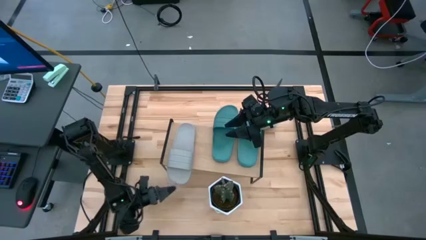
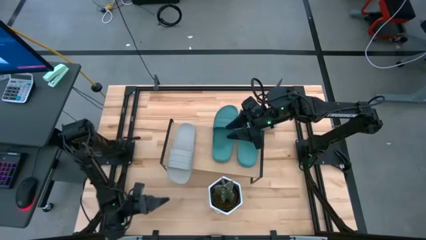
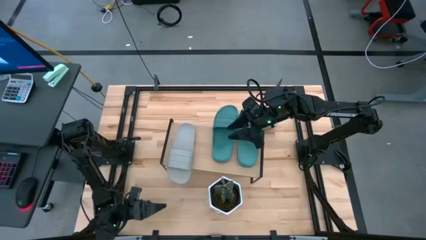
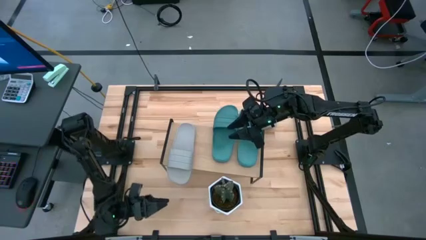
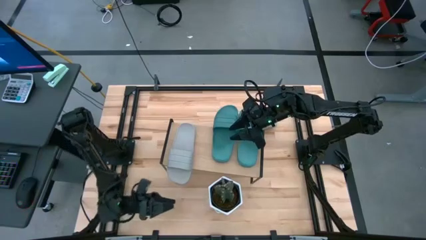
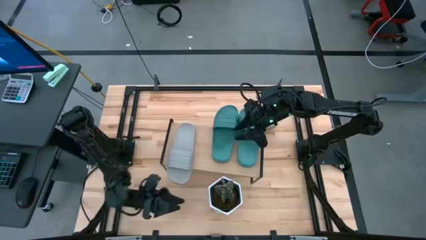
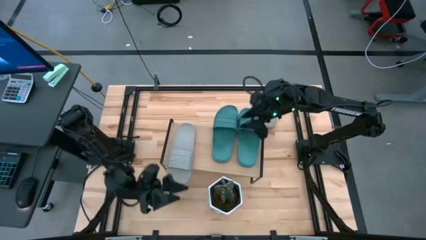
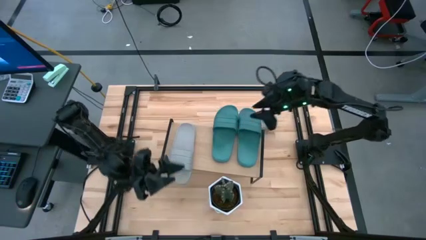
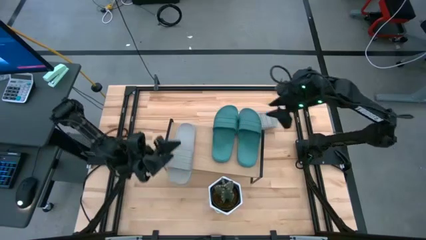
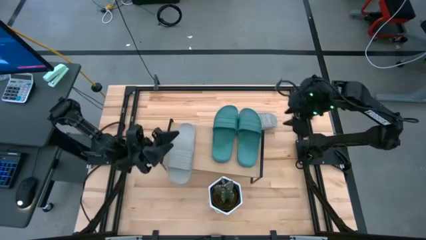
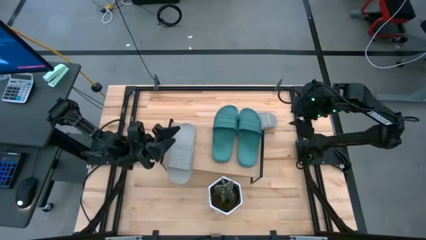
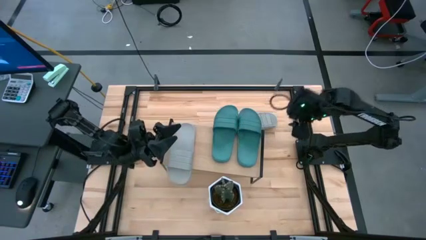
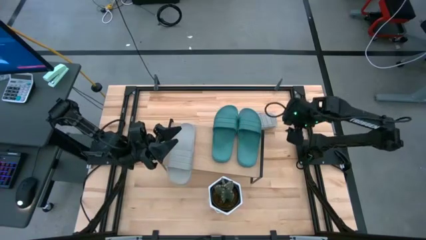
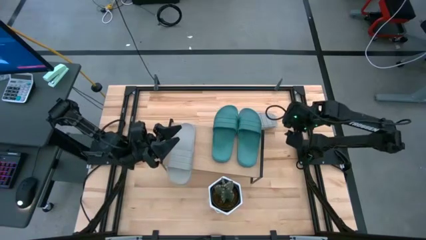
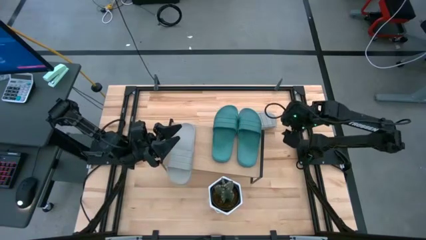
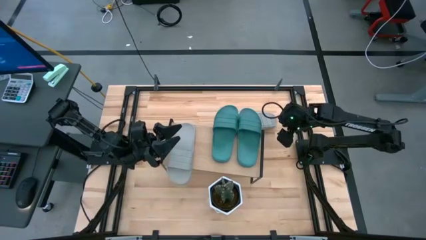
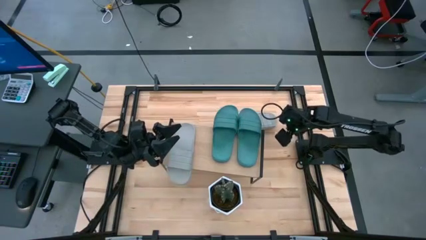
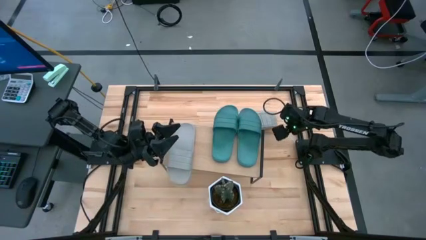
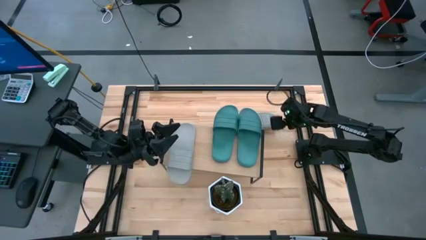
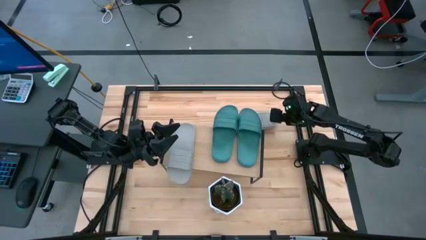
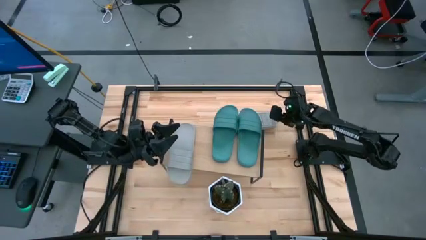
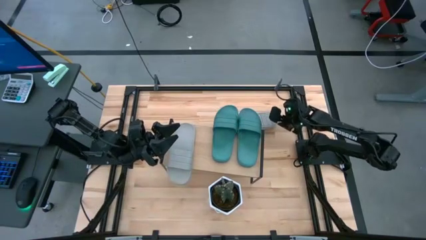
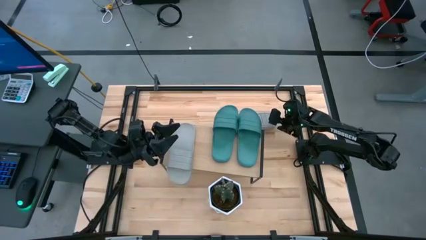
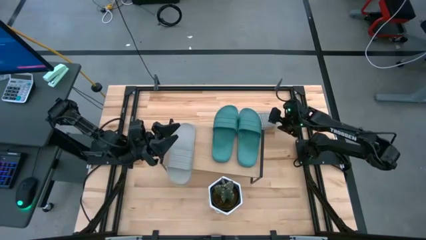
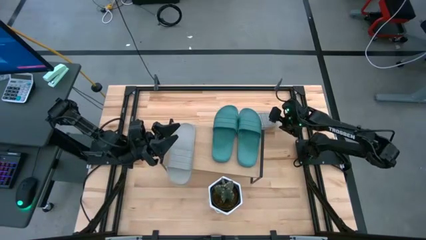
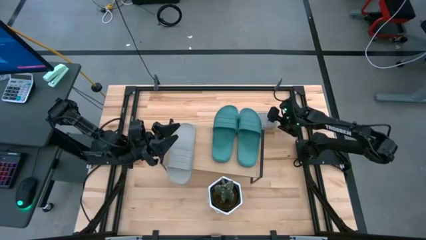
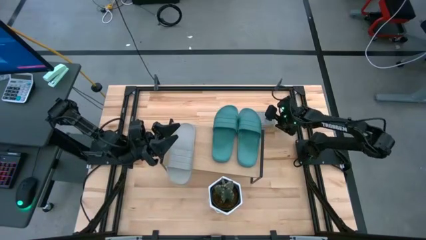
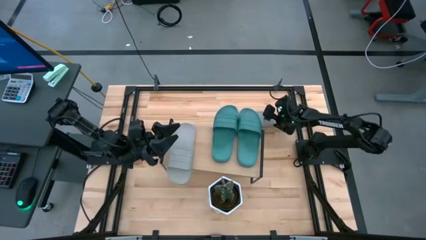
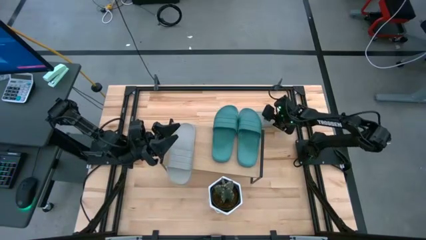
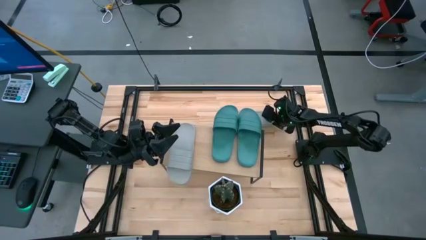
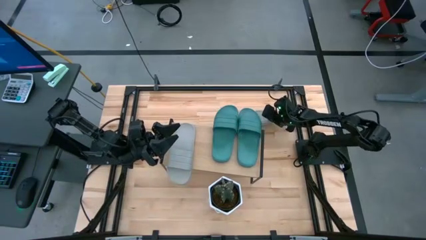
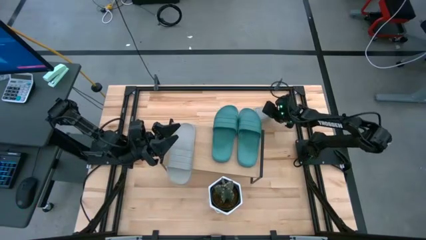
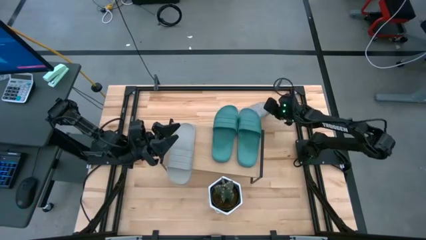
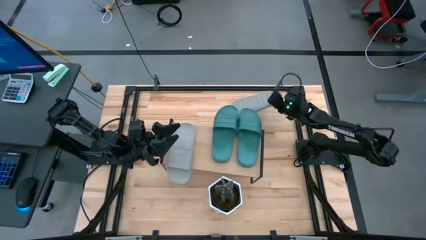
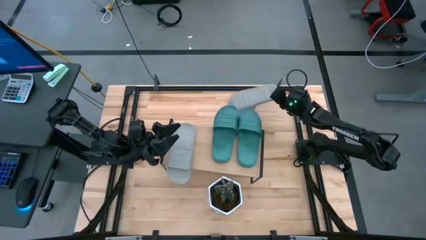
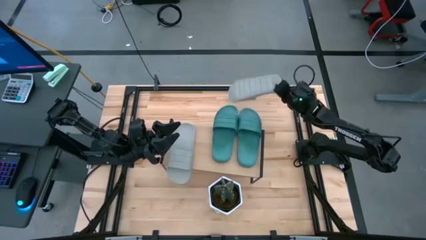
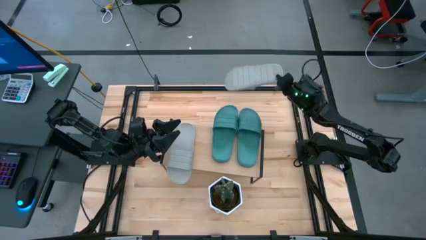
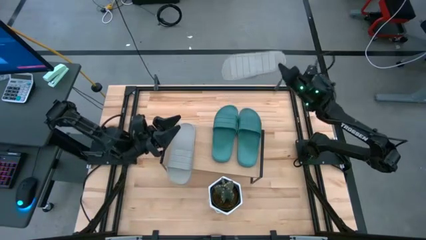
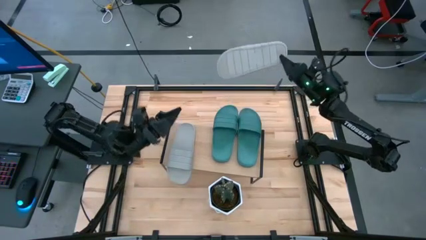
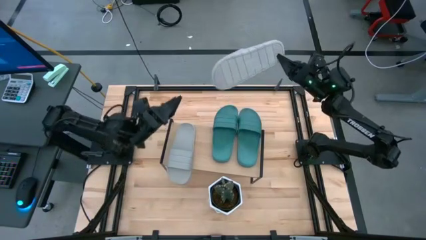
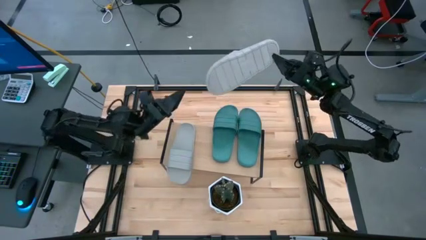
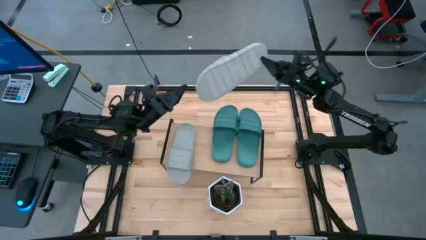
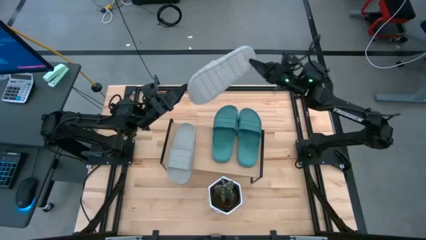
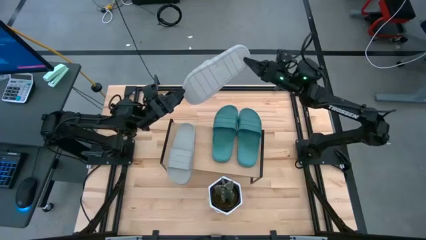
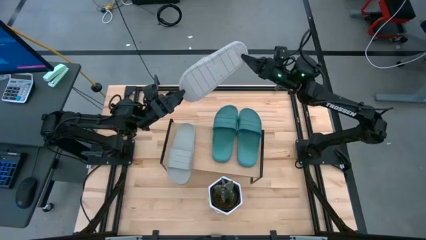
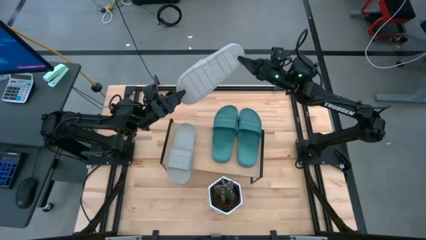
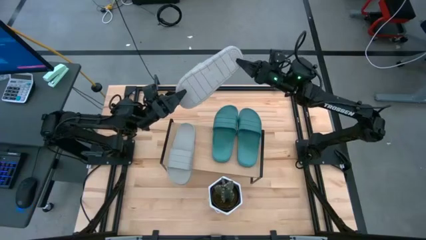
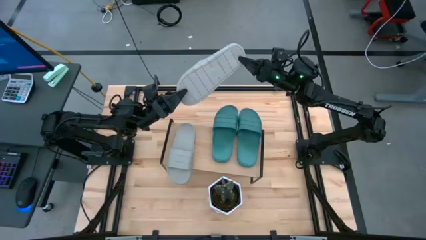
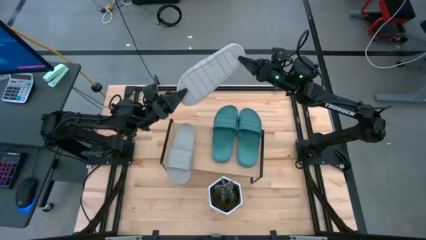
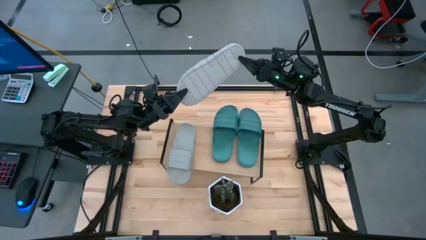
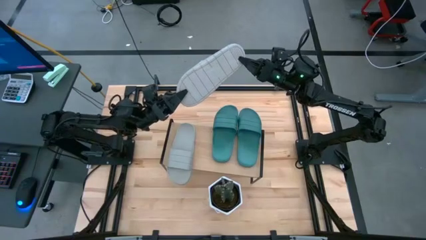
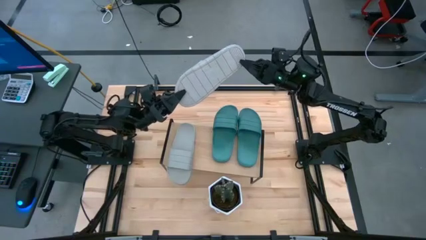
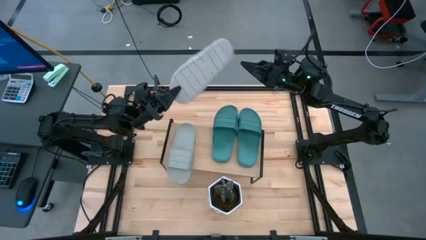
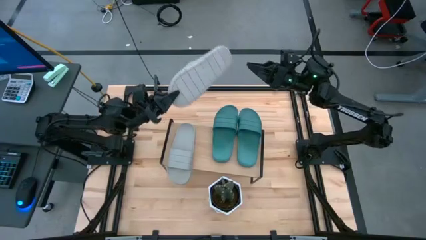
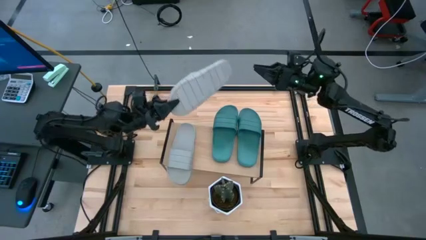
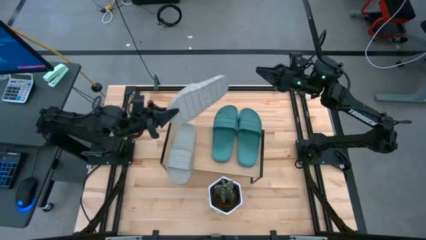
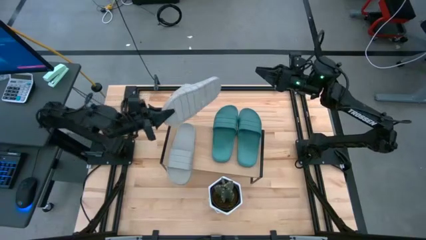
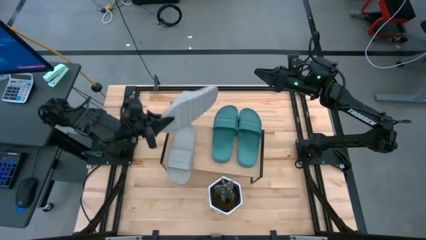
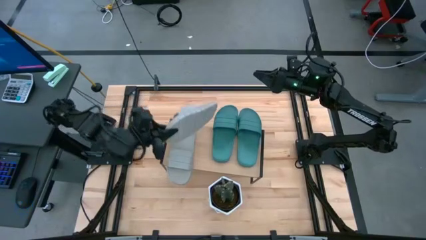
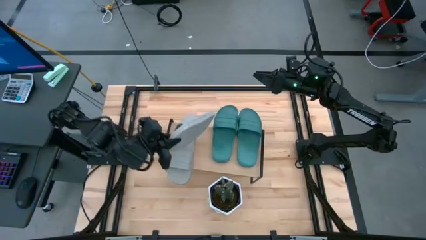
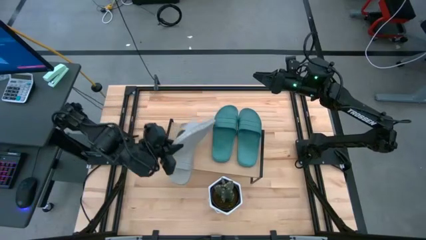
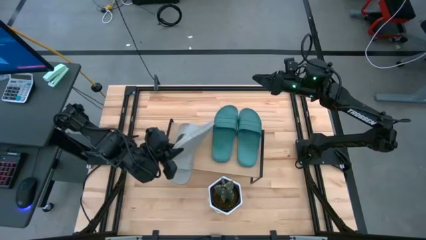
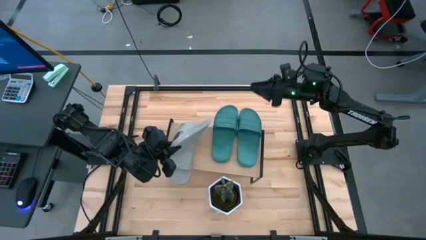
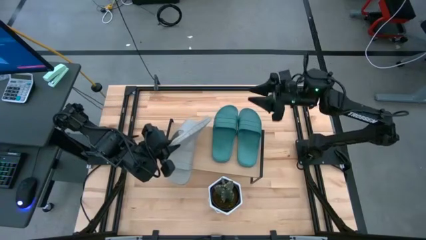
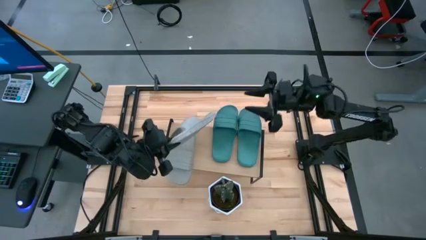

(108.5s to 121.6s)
Task: Pick and place slides into the shelf
Put the gray slide on the shelf

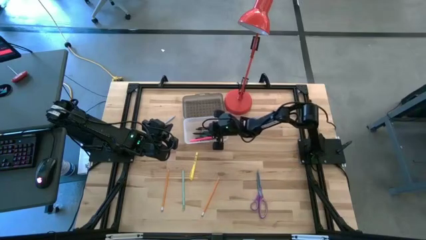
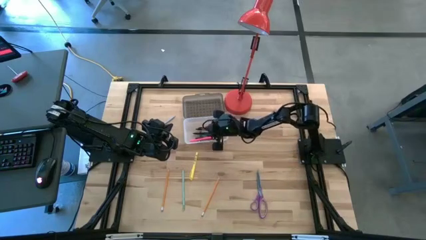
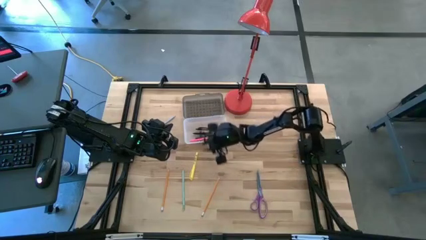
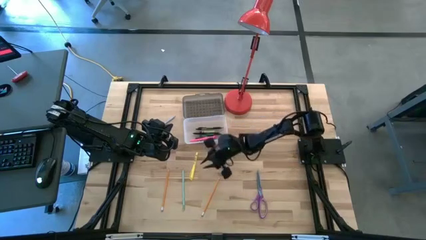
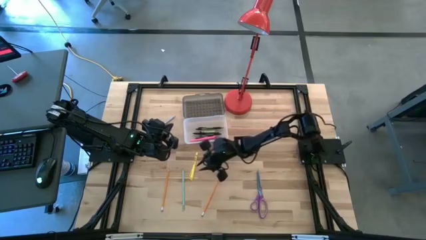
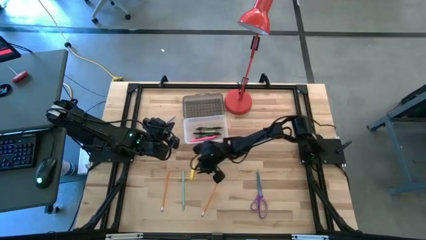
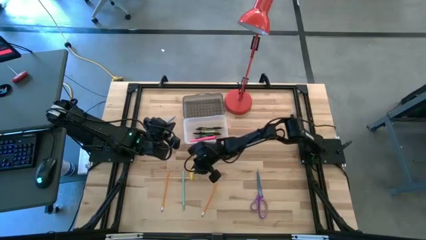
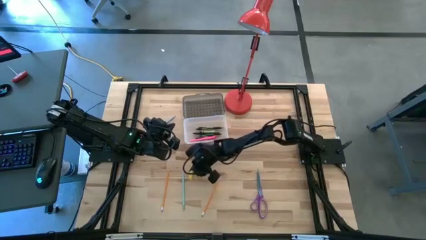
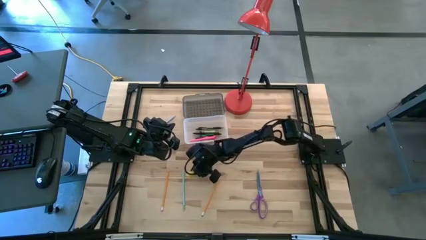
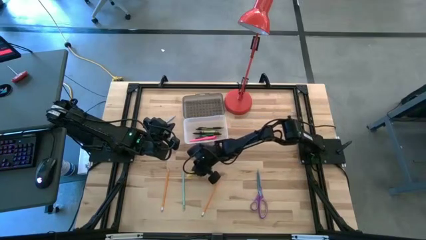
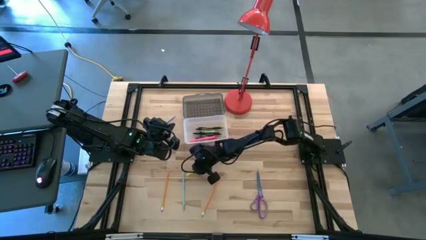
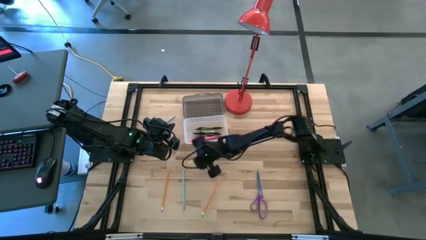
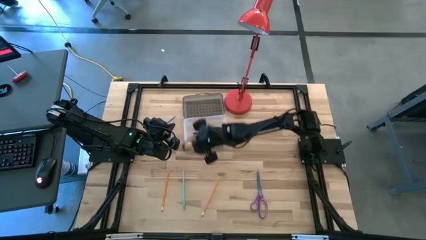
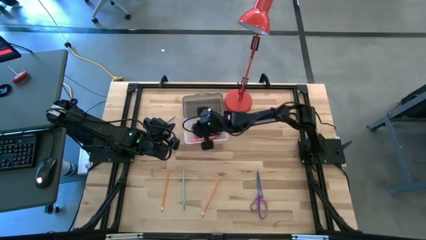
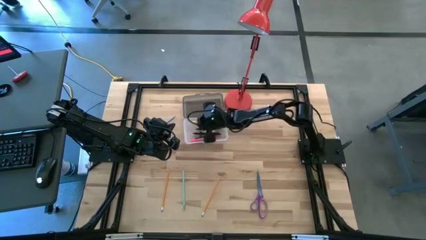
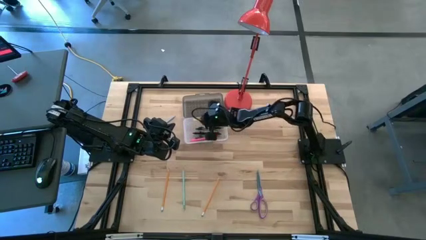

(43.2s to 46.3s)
Task: Pick & place school supplies into a supply box
Put the yellow pen into the black supply box
